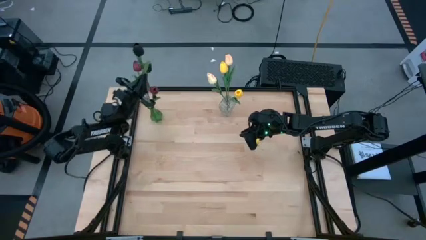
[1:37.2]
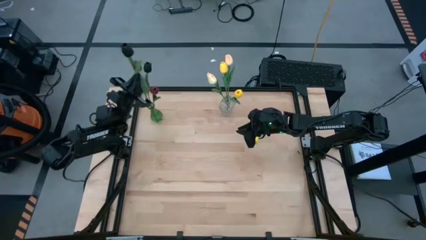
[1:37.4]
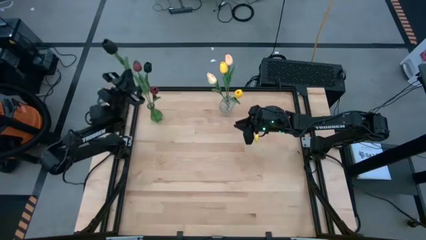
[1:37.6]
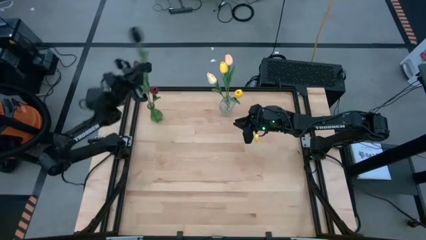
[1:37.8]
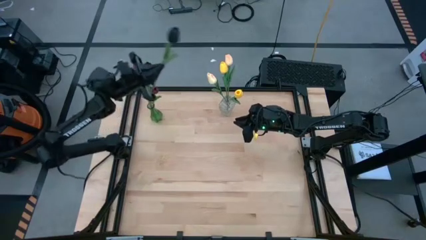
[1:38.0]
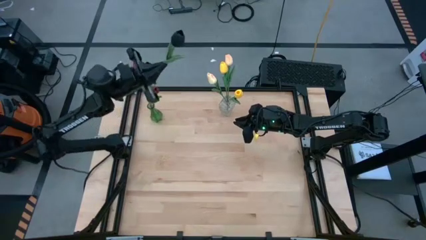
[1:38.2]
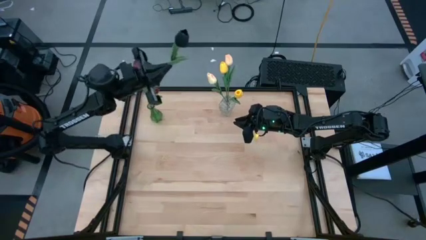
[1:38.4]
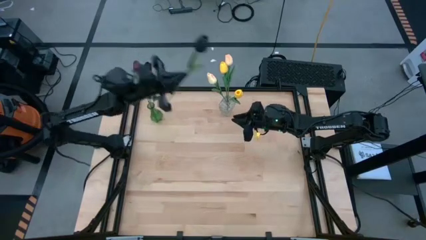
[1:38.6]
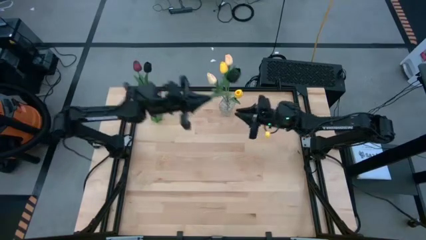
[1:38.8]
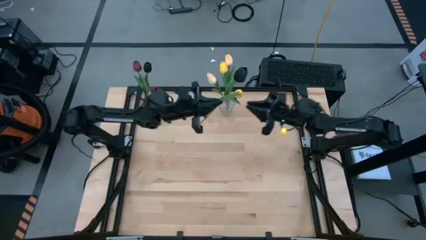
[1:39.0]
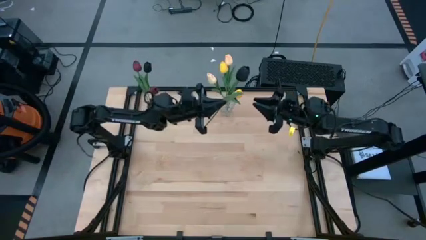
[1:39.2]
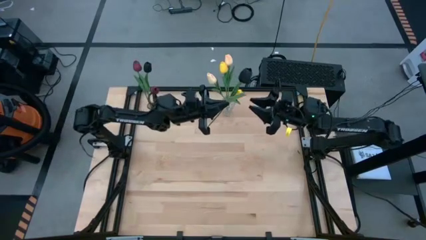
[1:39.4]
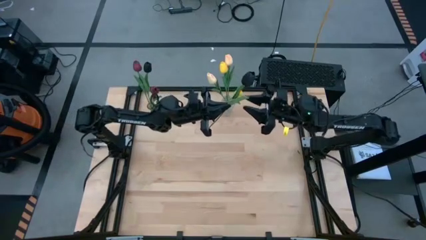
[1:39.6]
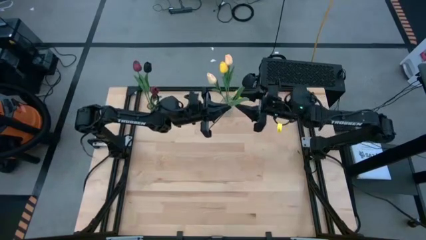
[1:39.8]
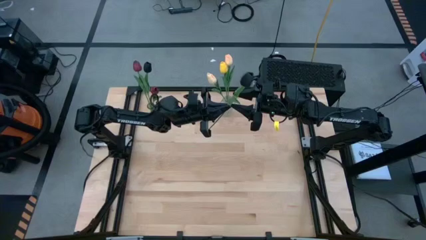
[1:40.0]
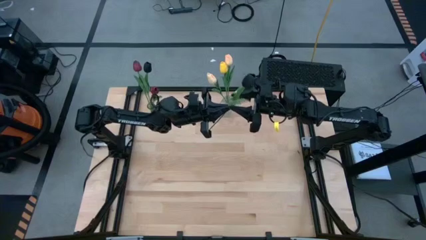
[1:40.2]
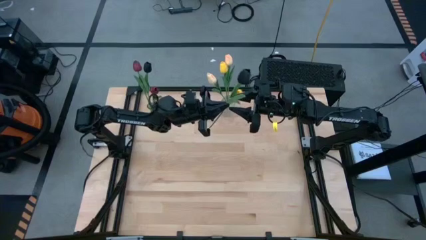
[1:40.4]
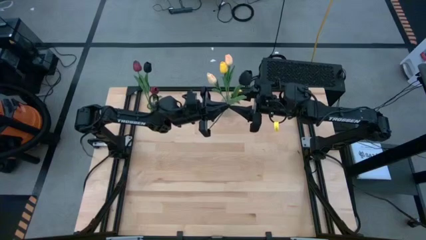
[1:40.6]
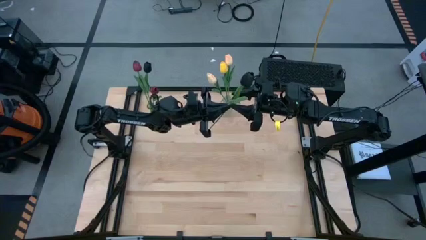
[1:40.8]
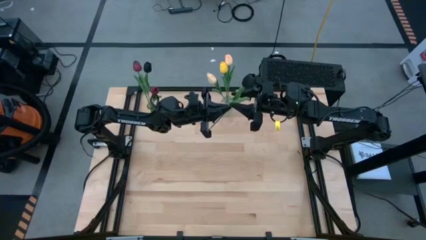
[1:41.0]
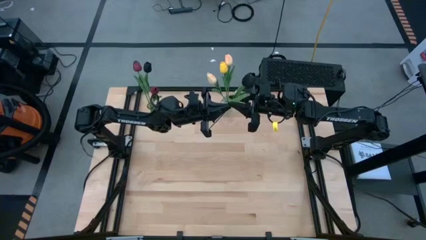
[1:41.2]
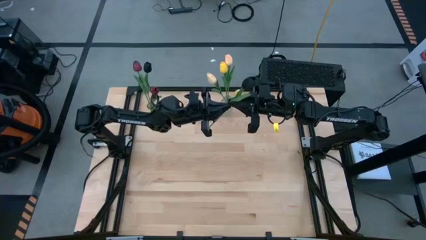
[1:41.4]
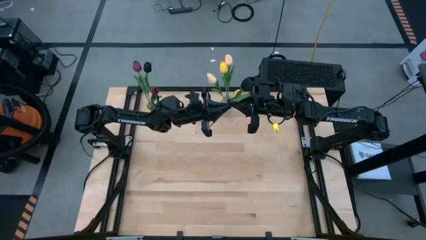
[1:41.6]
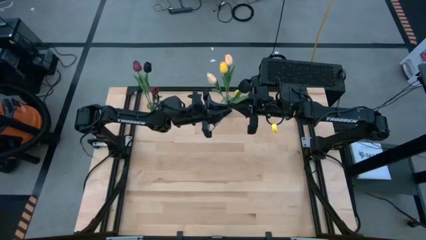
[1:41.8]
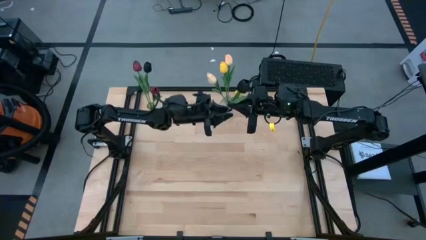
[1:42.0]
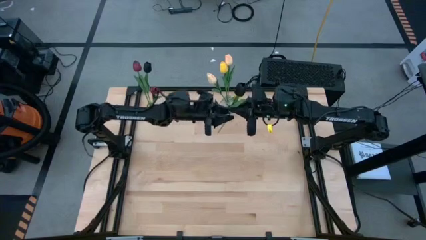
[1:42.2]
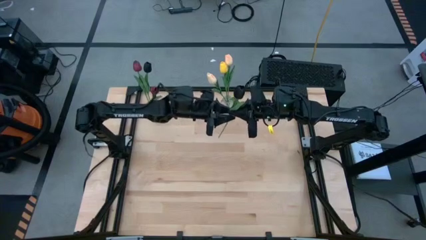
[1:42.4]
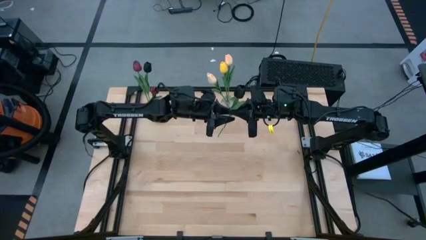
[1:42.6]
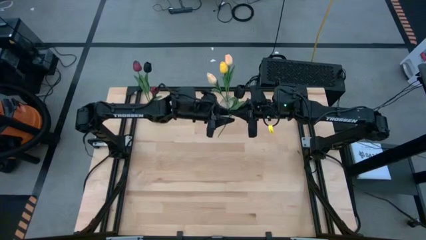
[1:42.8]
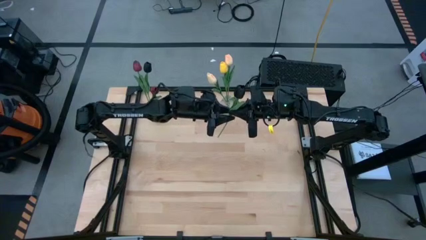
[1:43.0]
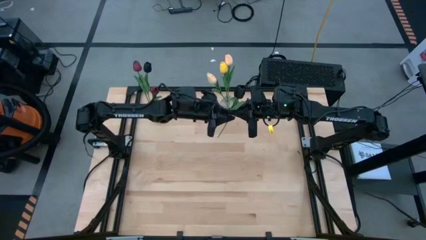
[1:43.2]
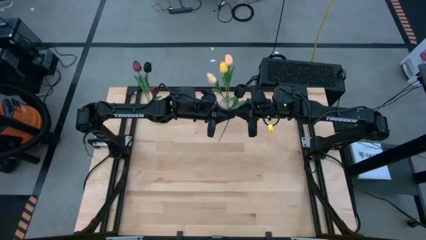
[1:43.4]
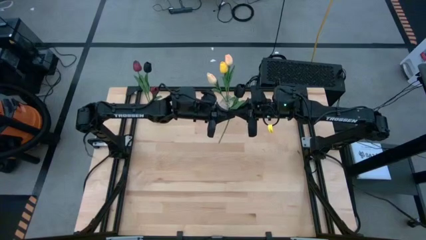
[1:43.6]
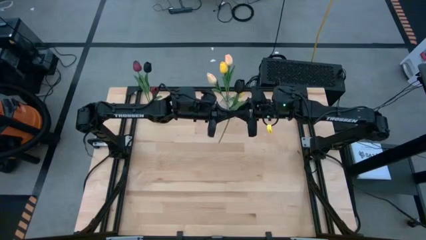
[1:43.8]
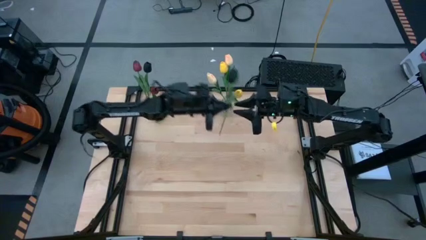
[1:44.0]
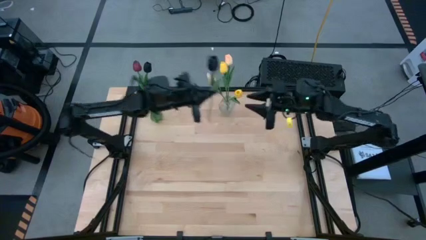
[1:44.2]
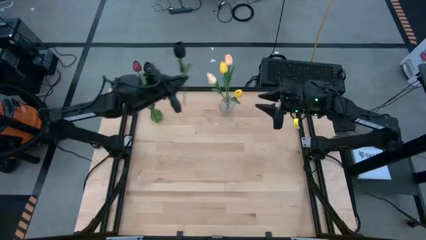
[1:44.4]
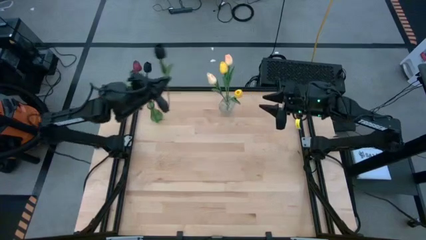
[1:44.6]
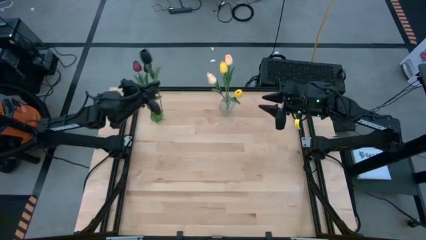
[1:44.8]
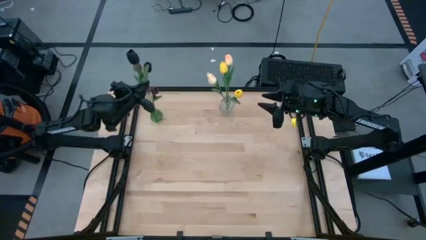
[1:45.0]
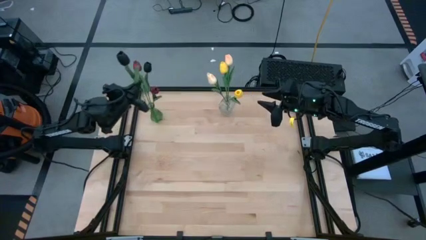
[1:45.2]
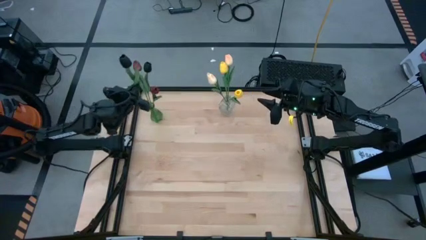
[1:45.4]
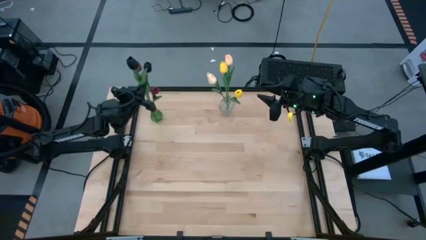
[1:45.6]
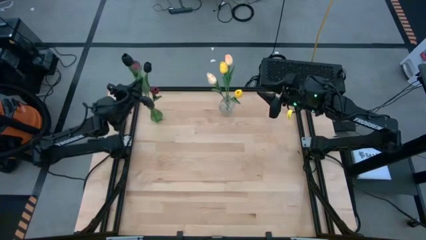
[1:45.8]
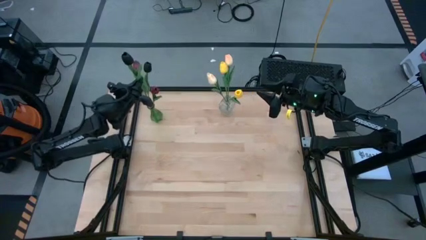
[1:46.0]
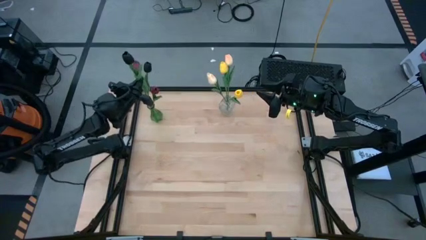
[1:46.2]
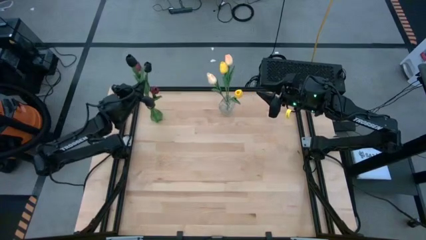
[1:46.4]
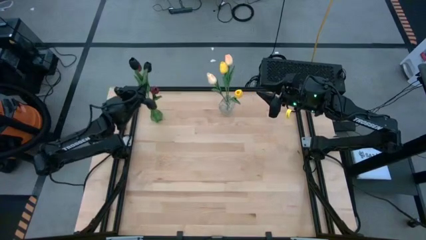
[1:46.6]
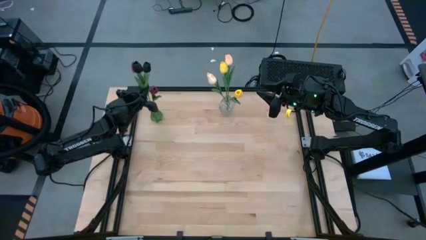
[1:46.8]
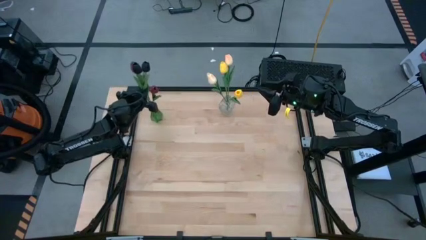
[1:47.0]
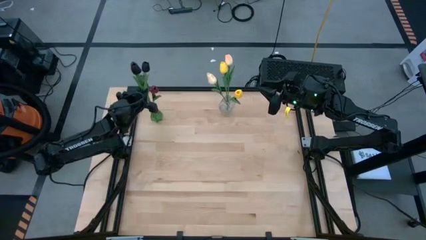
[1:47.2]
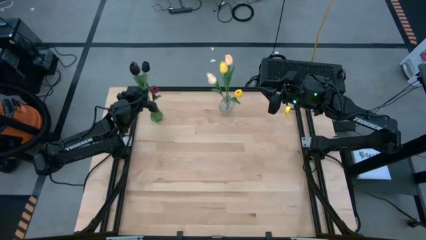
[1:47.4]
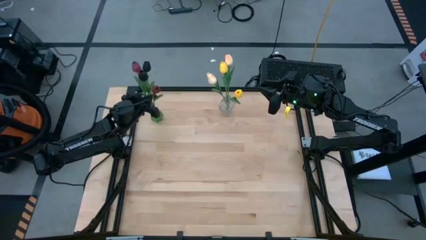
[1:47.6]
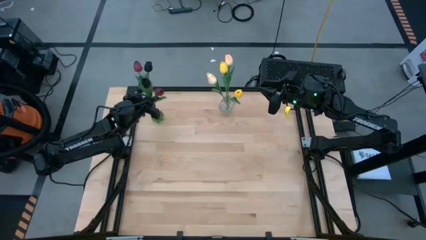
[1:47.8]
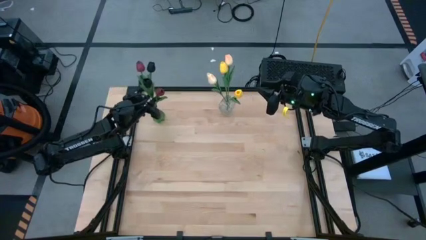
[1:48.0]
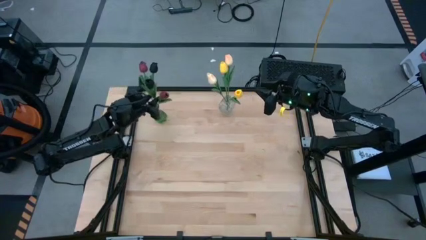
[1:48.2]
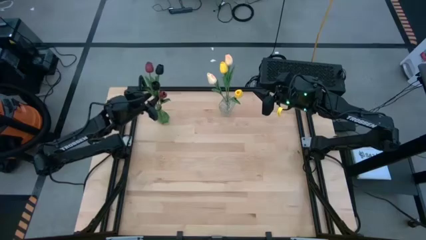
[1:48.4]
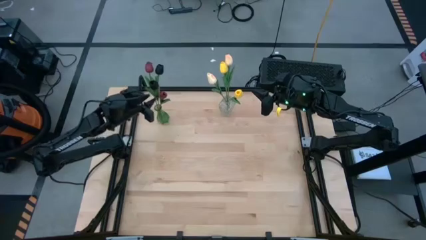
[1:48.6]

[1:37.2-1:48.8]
Task: Sort flowers into vase by color
Put the black tulip into the green vase

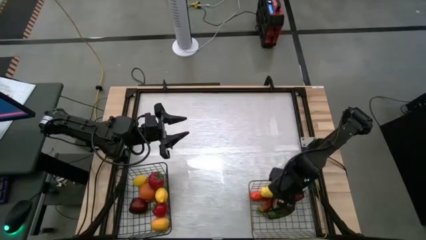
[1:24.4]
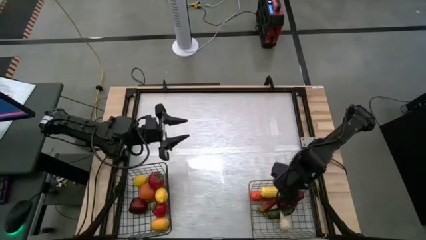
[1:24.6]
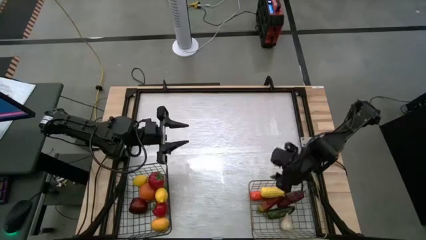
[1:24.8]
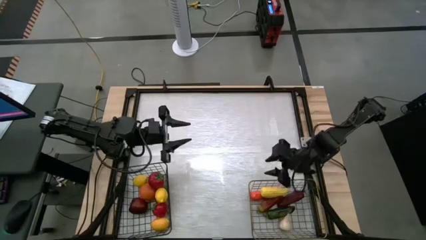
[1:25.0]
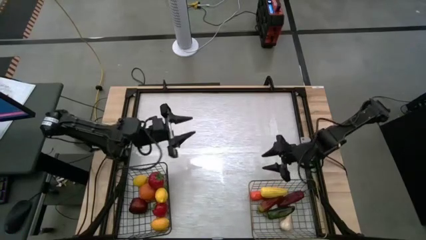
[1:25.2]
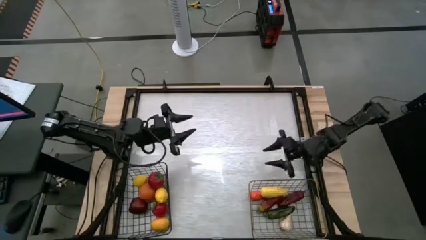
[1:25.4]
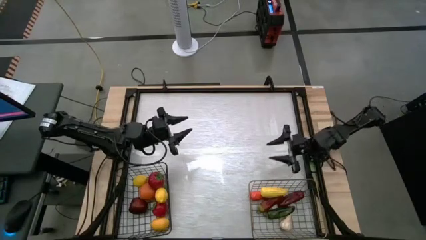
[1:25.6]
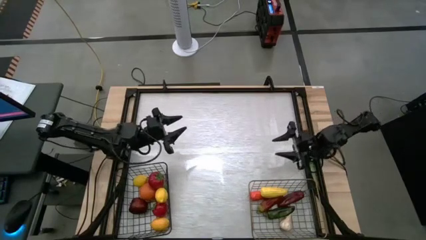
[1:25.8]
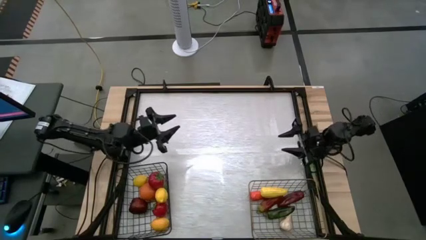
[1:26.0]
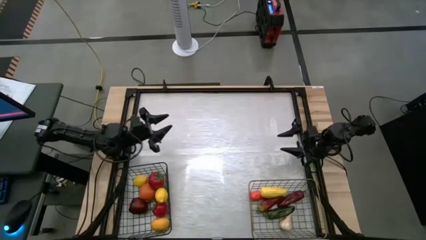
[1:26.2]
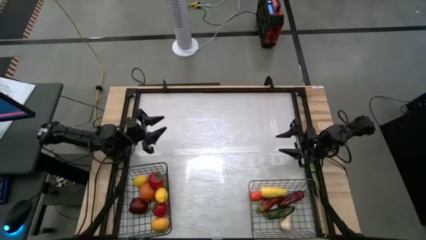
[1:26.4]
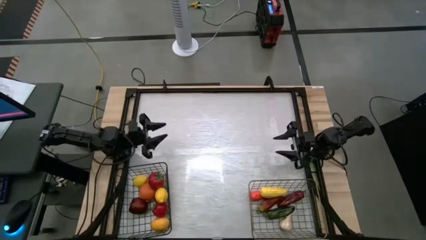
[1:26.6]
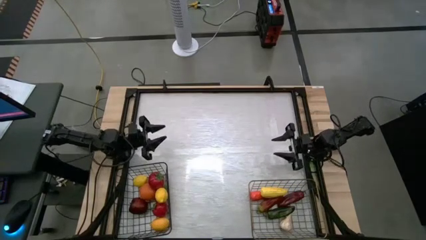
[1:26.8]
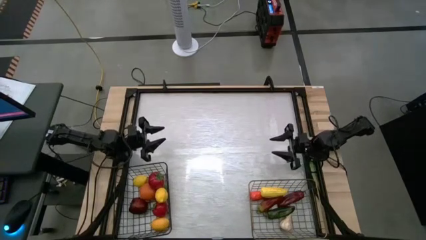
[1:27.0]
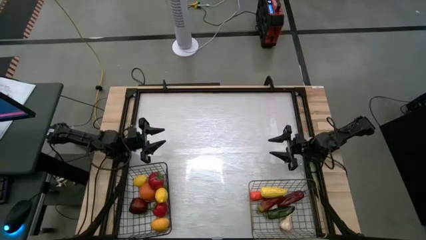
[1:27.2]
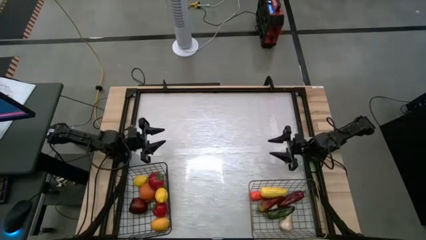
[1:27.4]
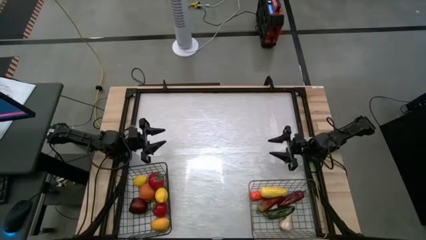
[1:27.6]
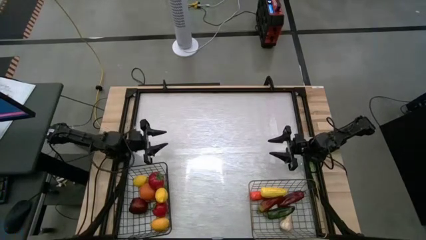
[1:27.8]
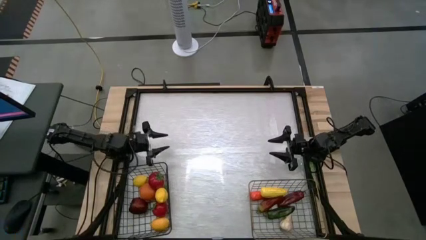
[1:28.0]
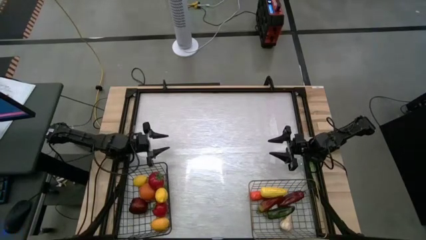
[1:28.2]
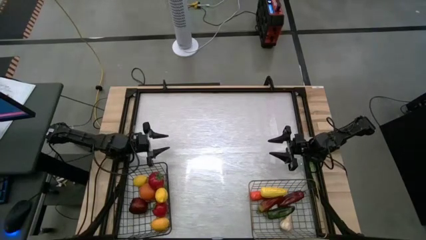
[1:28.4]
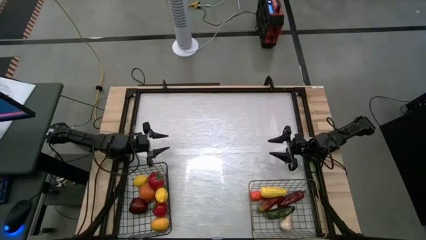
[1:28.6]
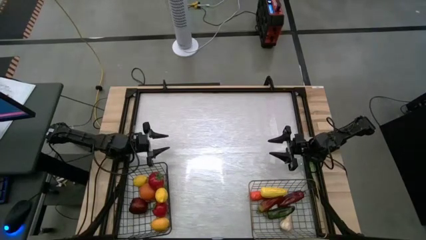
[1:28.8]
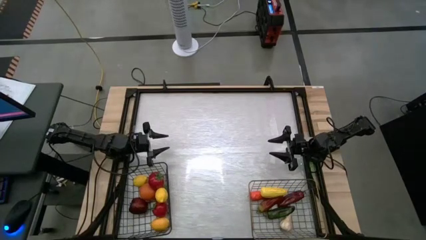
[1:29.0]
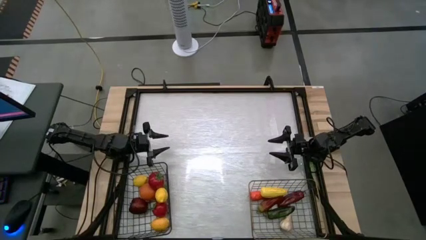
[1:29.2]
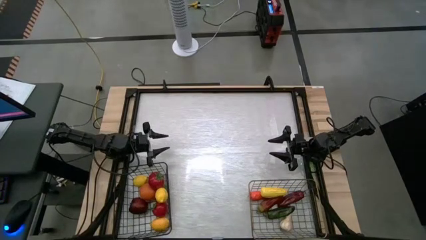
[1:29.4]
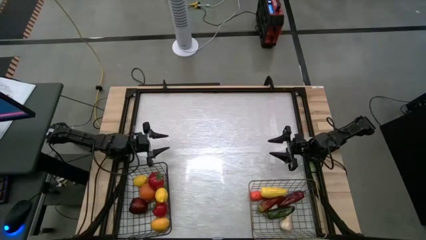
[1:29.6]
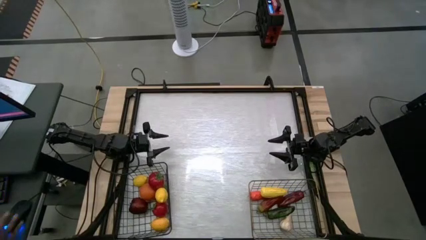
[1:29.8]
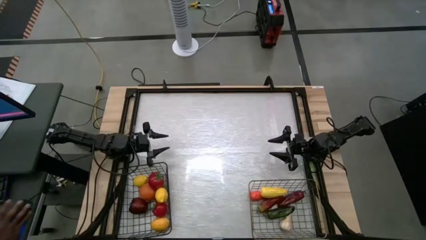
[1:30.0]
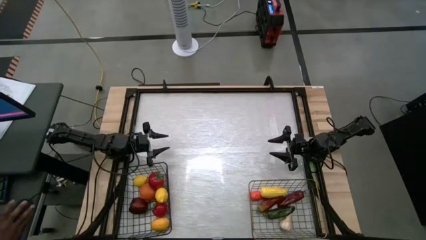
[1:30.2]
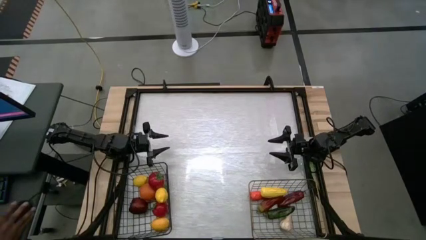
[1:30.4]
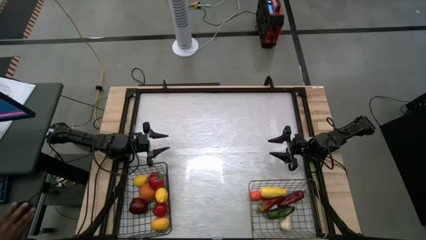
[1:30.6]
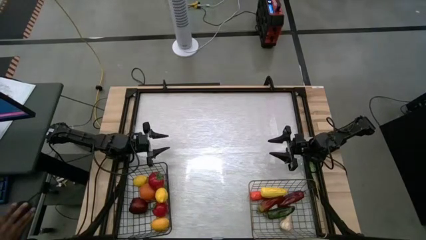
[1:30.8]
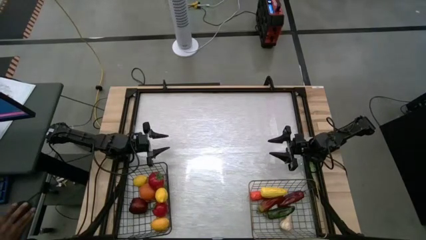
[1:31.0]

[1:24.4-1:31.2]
Task: Sort produce into baskets
Return to Home Position
